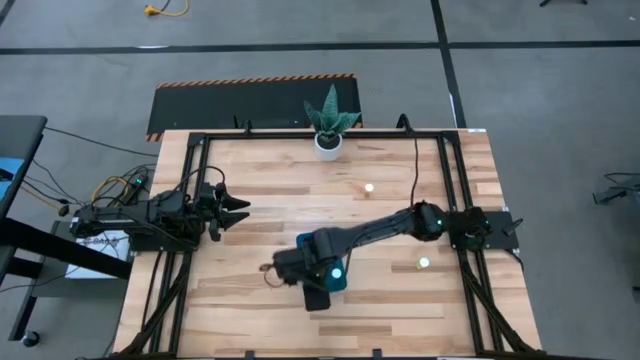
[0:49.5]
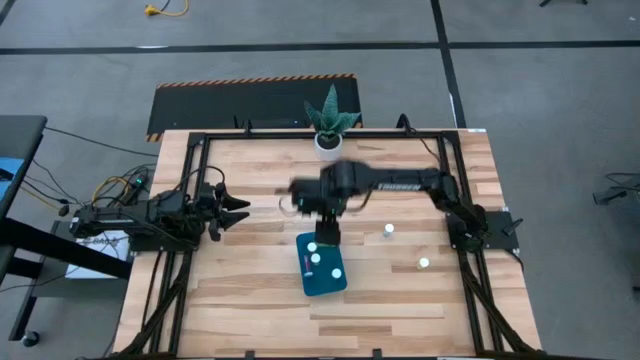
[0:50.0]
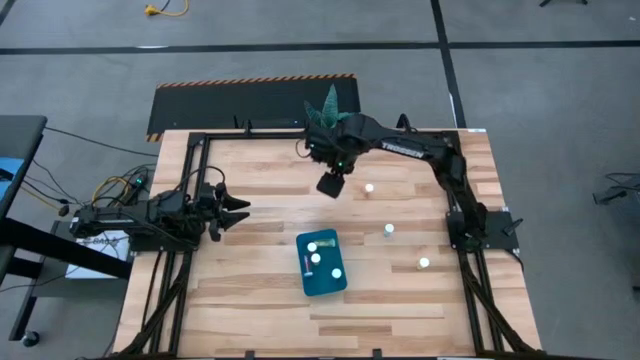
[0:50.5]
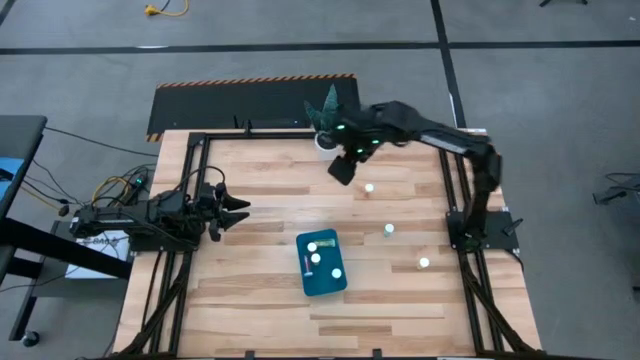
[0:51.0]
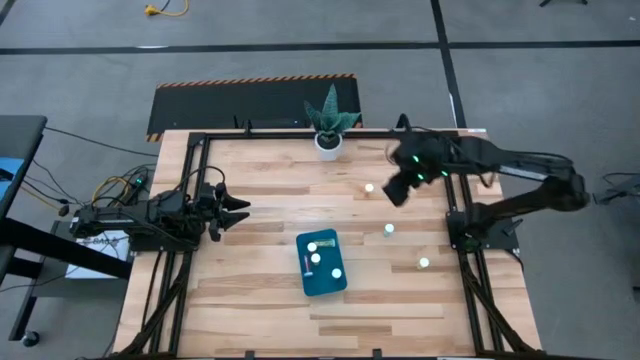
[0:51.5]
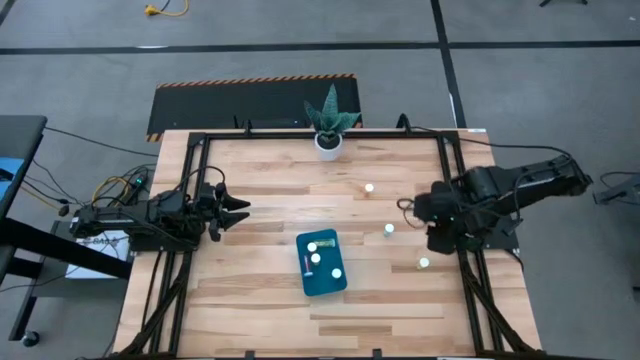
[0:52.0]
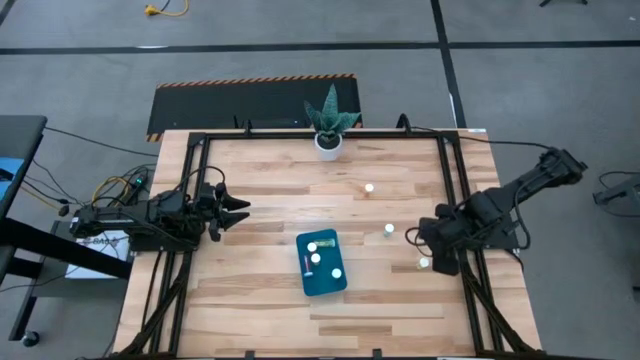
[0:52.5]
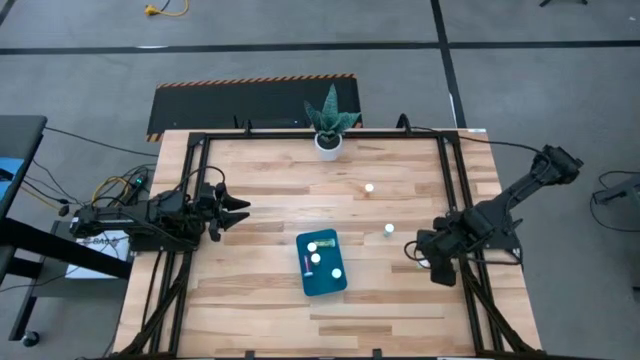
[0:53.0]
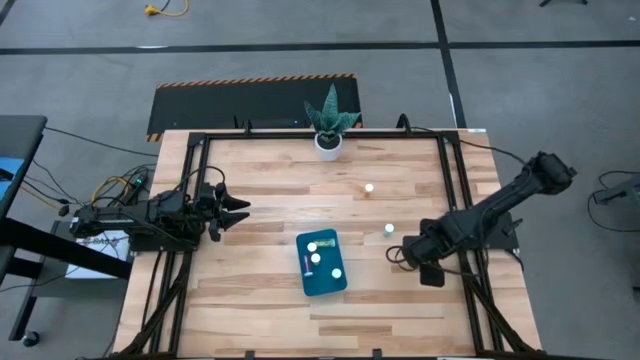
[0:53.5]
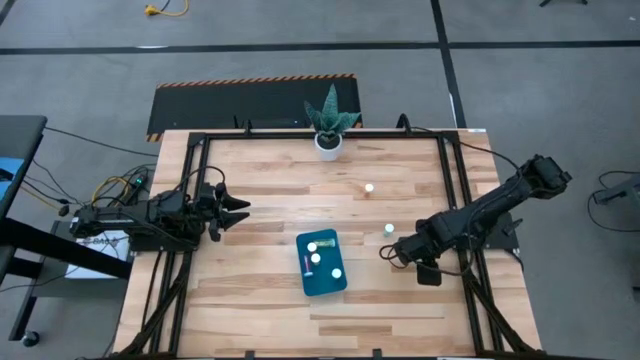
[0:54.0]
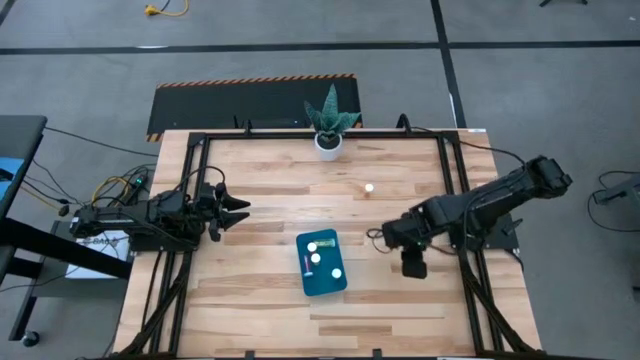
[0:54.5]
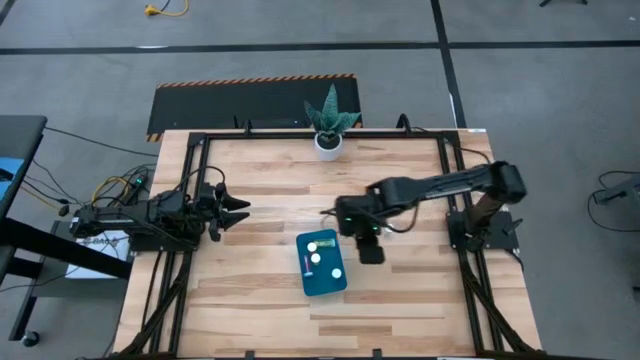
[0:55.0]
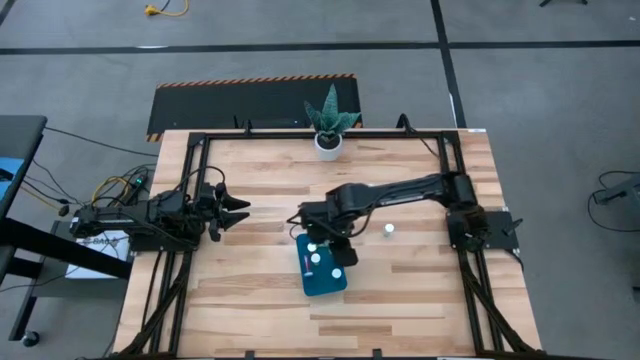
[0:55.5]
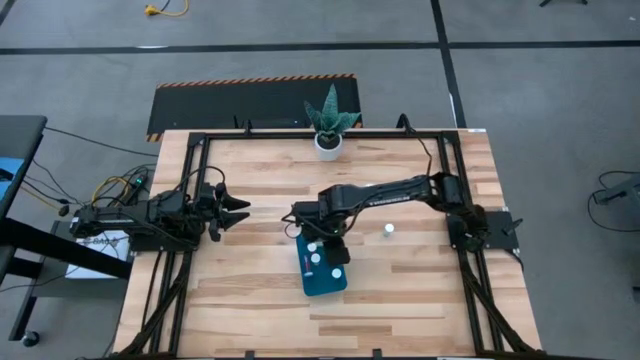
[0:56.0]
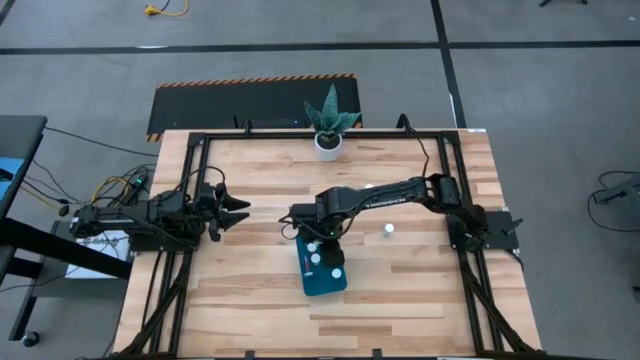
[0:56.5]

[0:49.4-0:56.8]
Task: Pick and place pill bottles into a basket
Put the bottom yellow pill bottle into the blue bin

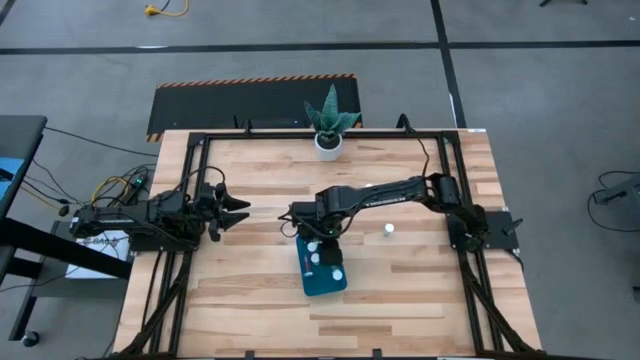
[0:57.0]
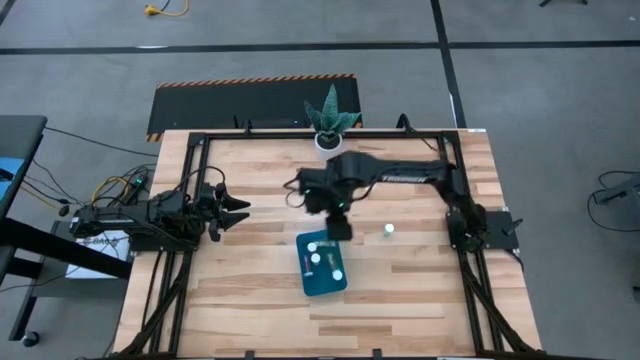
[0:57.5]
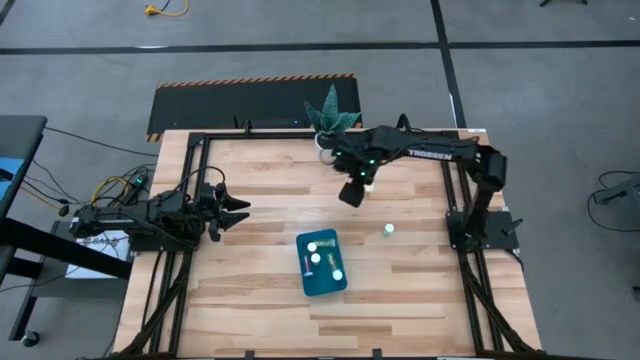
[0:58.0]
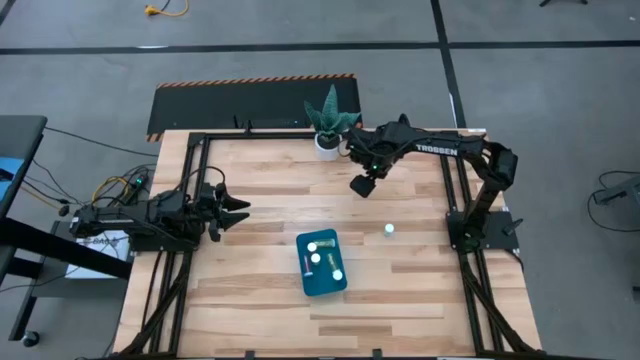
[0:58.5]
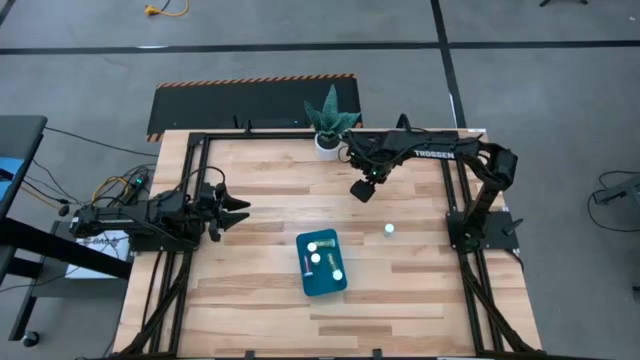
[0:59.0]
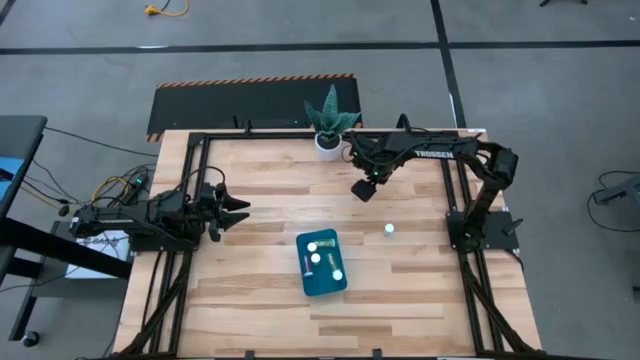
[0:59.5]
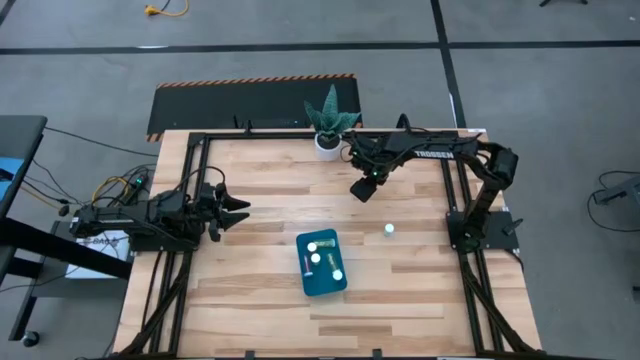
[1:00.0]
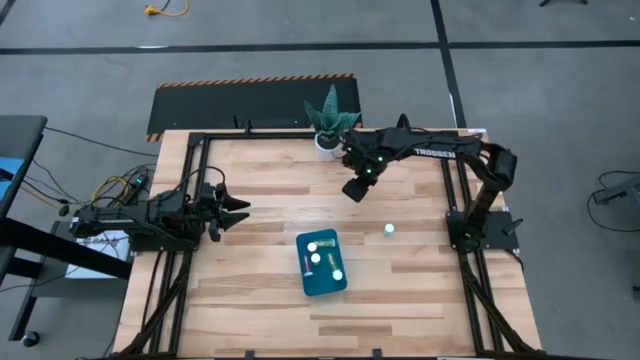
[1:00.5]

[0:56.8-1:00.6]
Put the yellow pill bottle into the blue bin

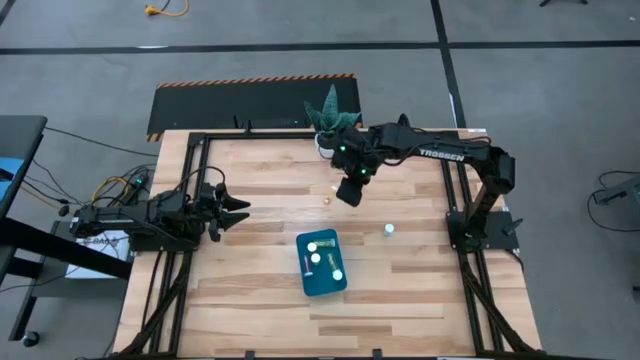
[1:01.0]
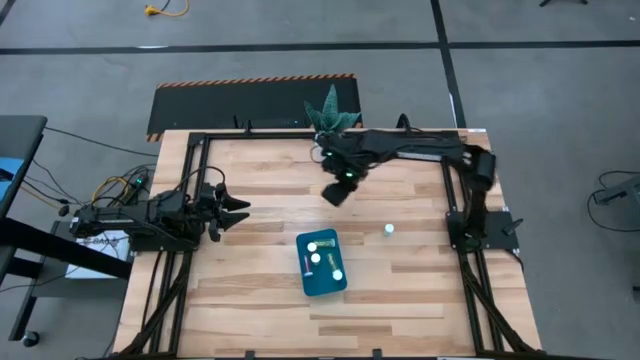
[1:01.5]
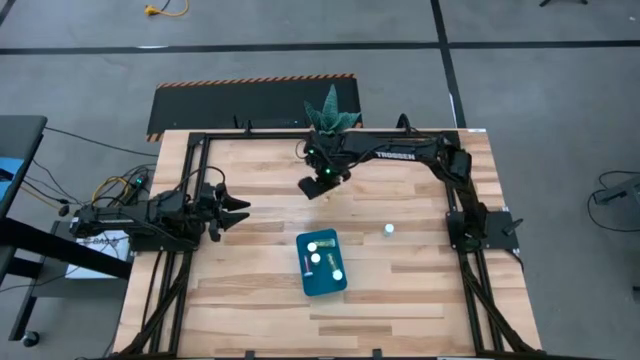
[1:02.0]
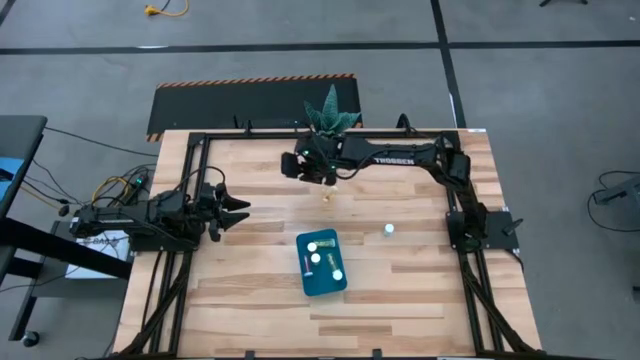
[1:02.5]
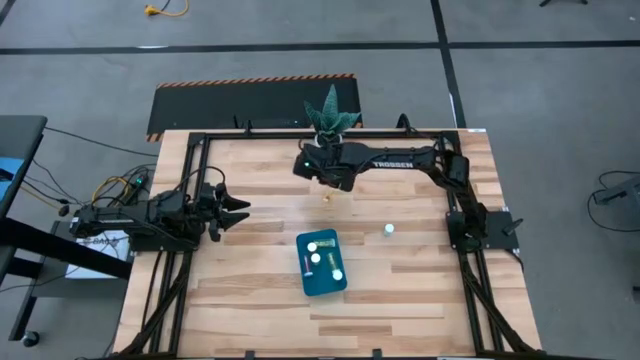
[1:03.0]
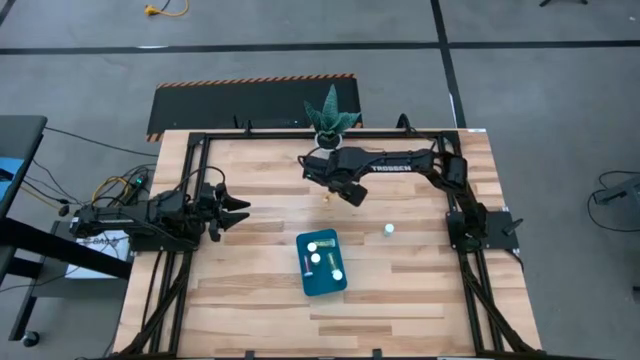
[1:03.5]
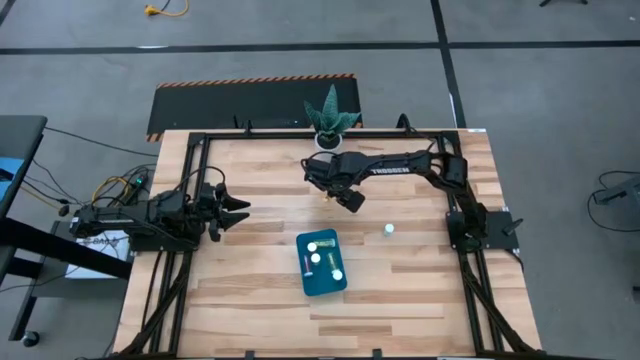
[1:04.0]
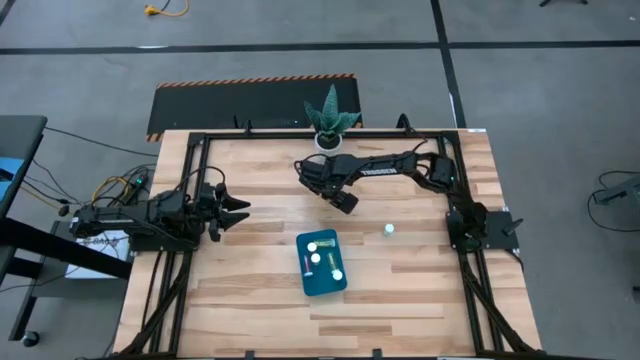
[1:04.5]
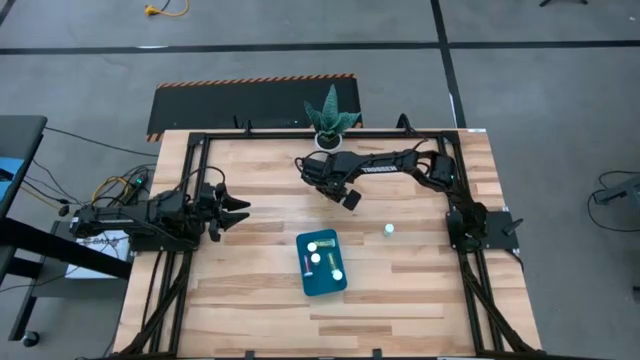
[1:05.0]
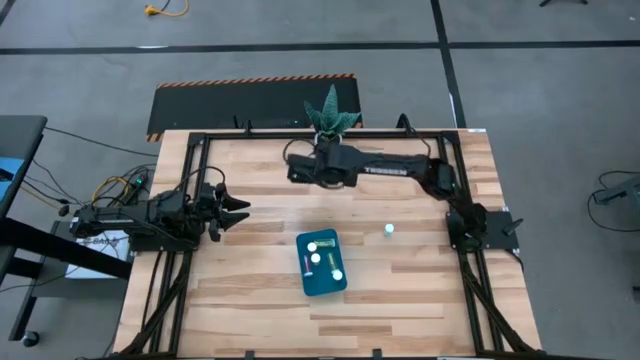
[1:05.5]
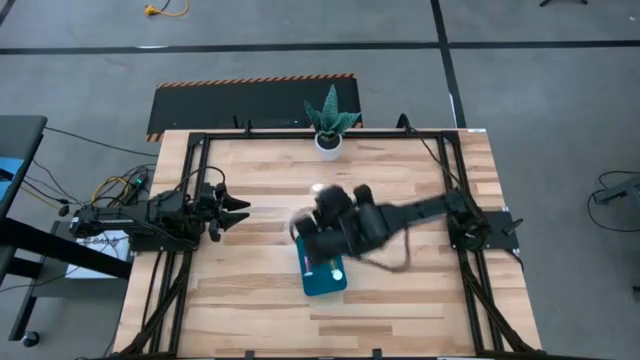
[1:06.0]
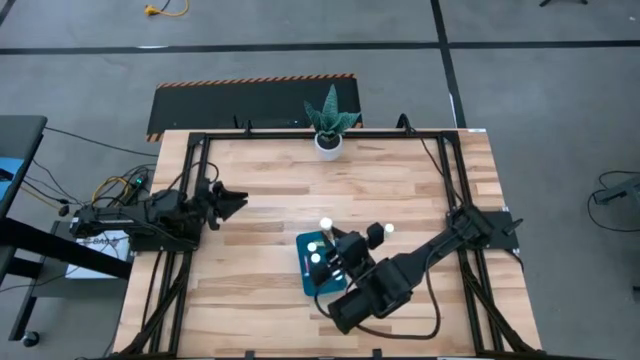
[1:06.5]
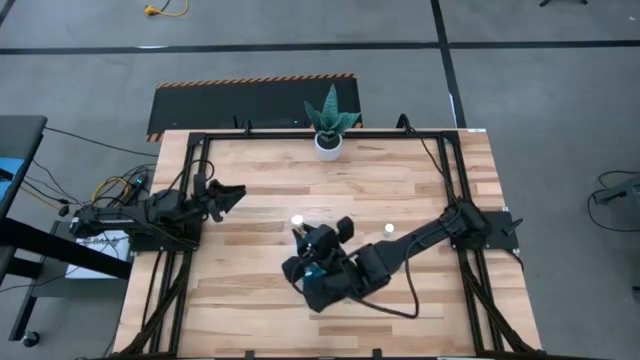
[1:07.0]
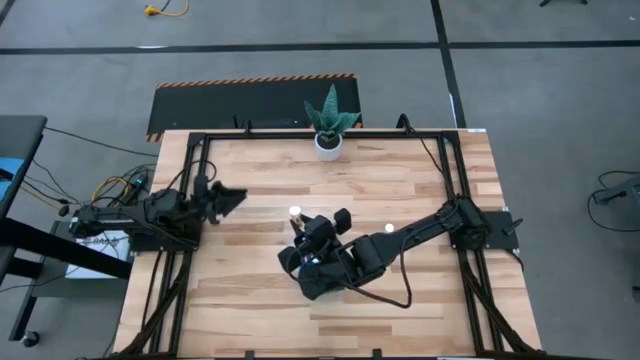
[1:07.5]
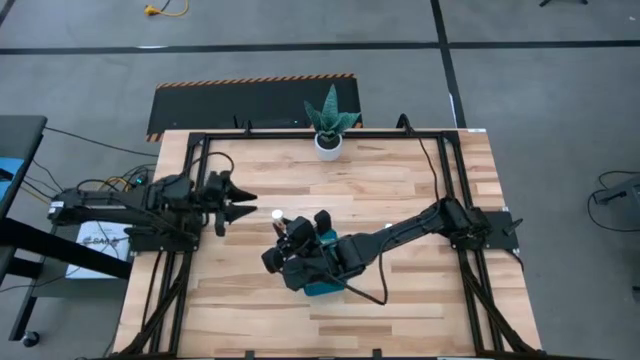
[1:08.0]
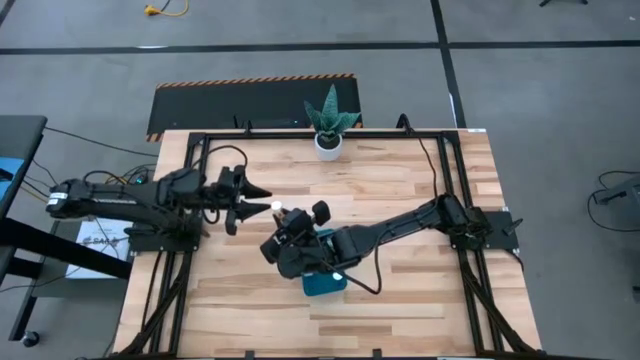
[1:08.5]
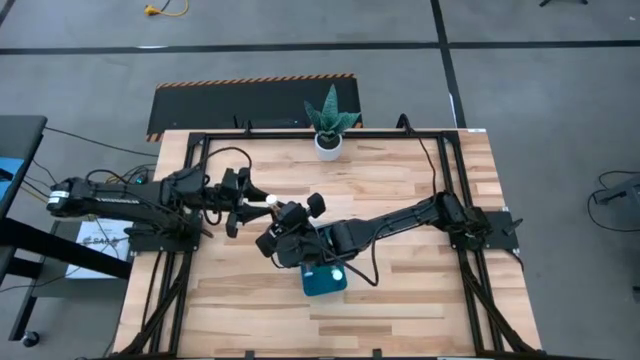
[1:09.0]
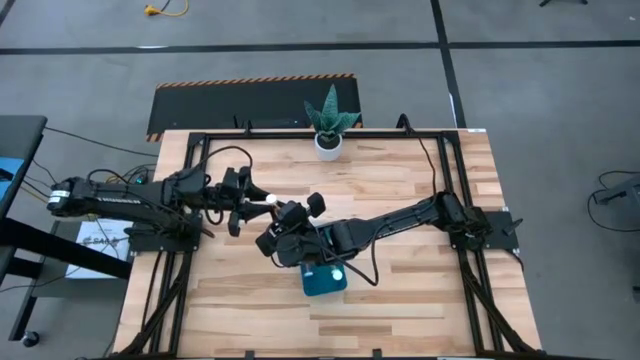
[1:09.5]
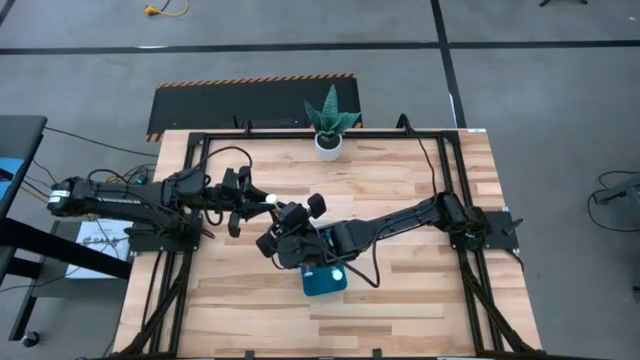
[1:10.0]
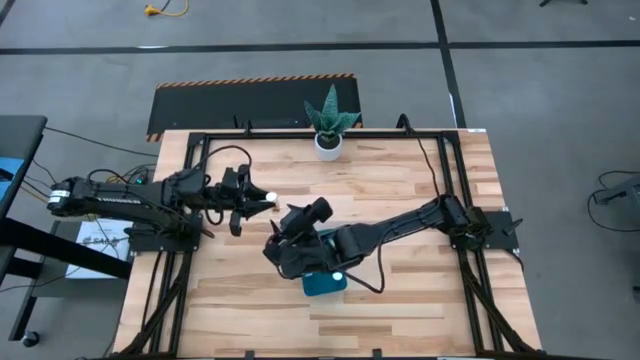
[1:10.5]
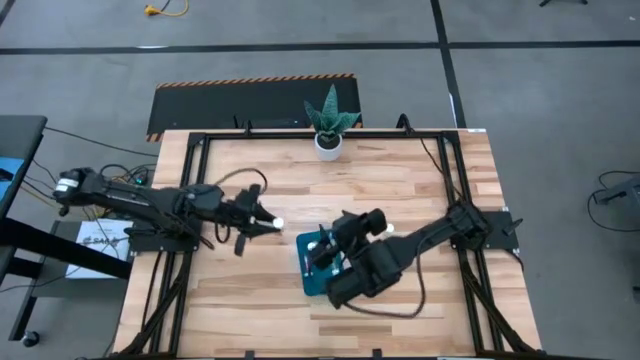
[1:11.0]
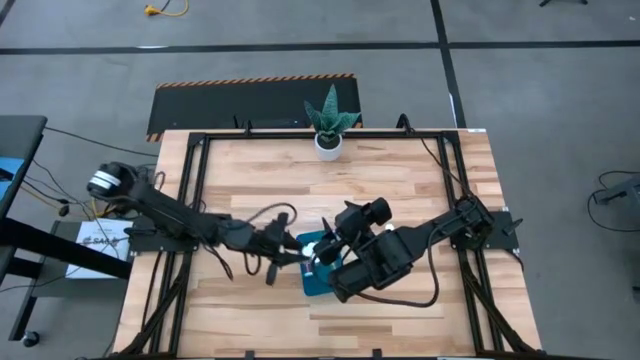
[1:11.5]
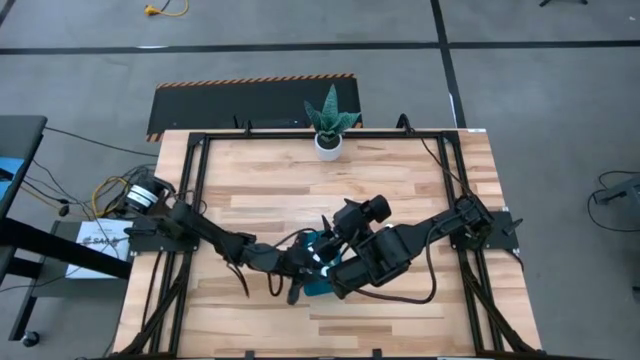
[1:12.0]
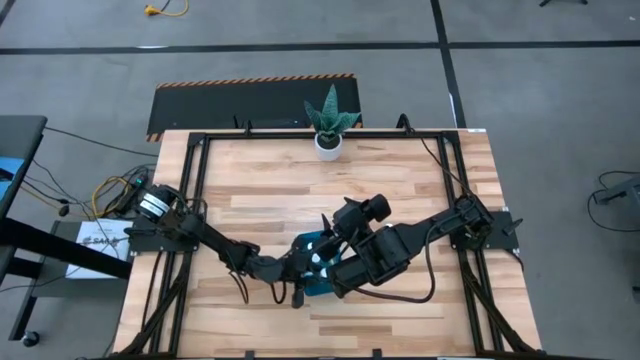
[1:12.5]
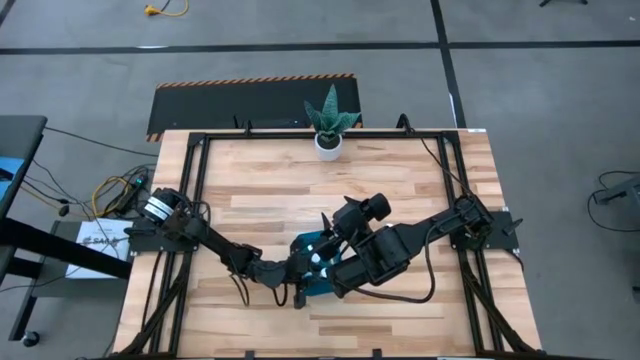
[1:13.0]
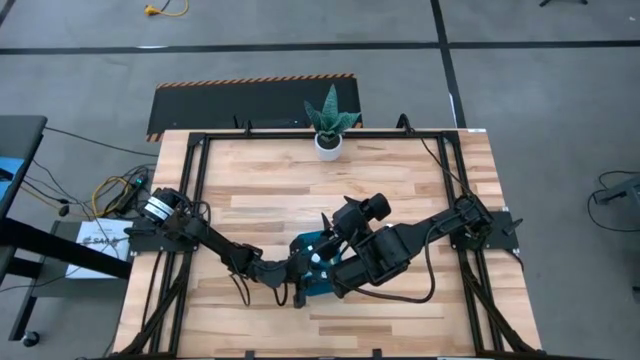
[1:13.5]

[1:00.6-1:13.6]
Put the yellow pill bottle into the blue bin
